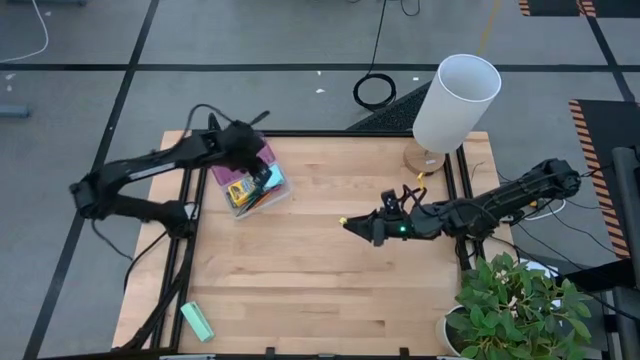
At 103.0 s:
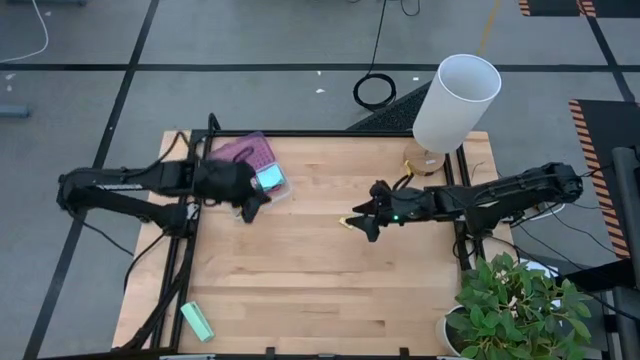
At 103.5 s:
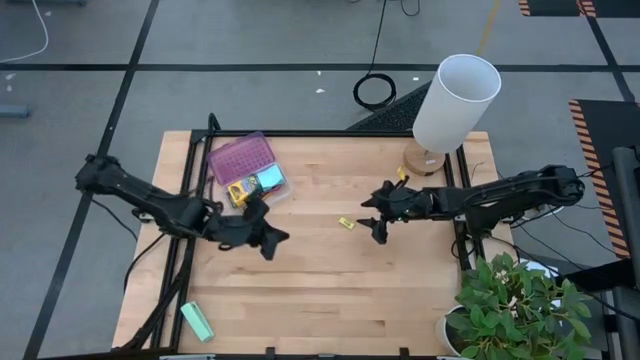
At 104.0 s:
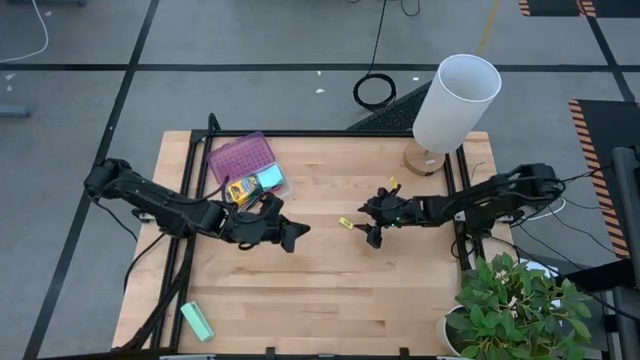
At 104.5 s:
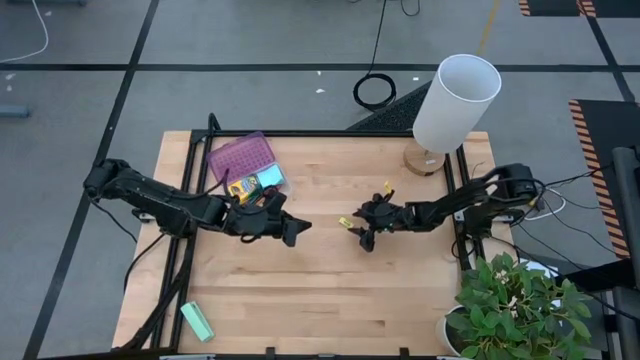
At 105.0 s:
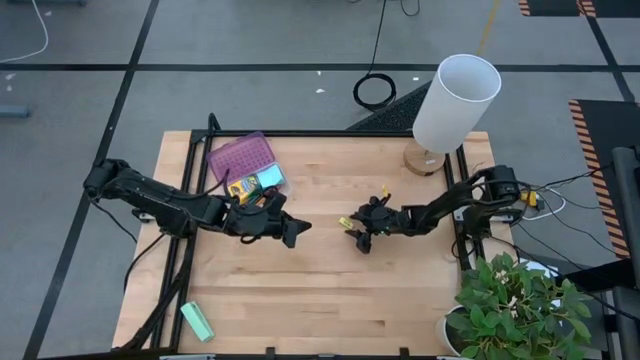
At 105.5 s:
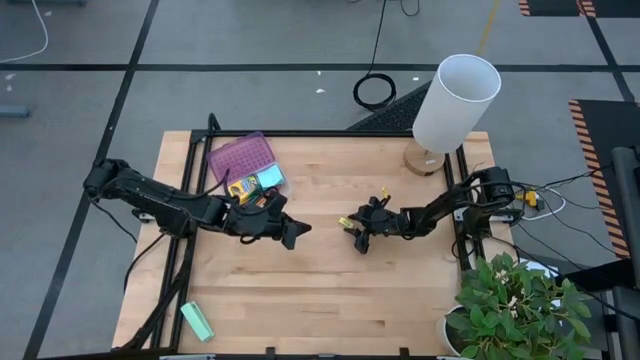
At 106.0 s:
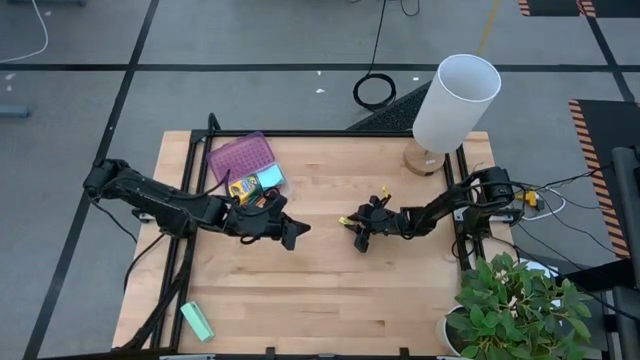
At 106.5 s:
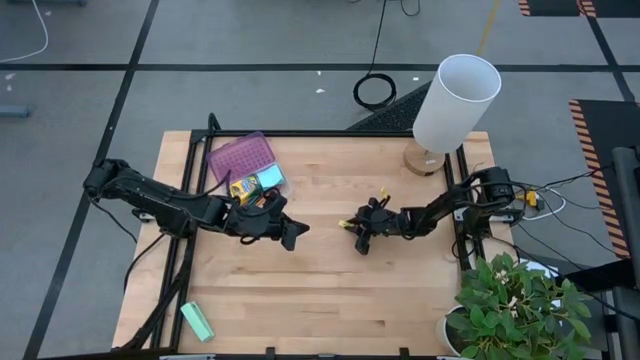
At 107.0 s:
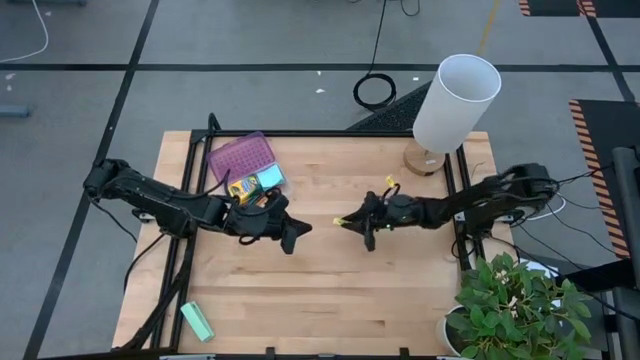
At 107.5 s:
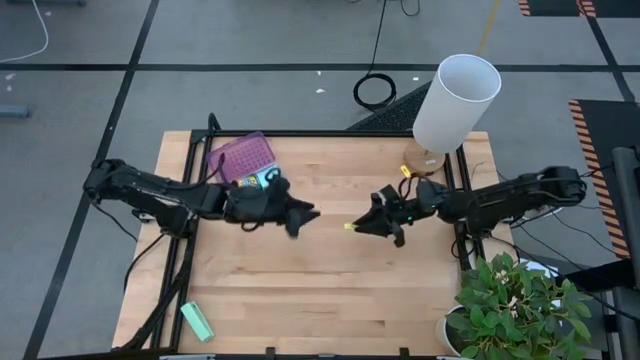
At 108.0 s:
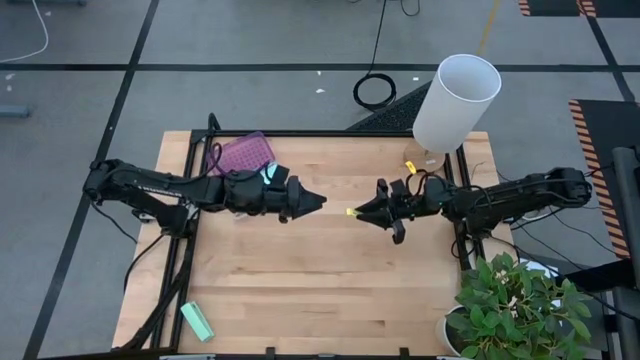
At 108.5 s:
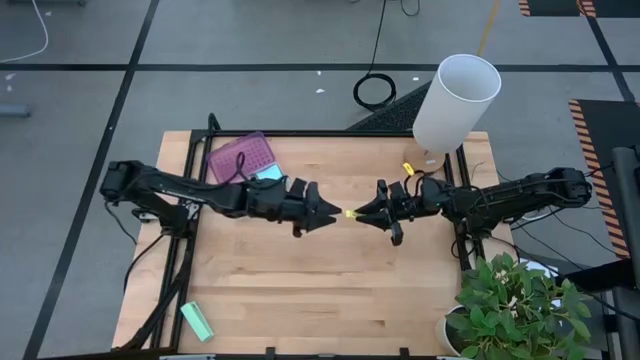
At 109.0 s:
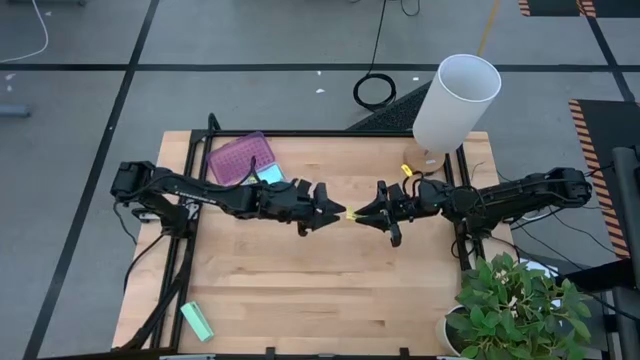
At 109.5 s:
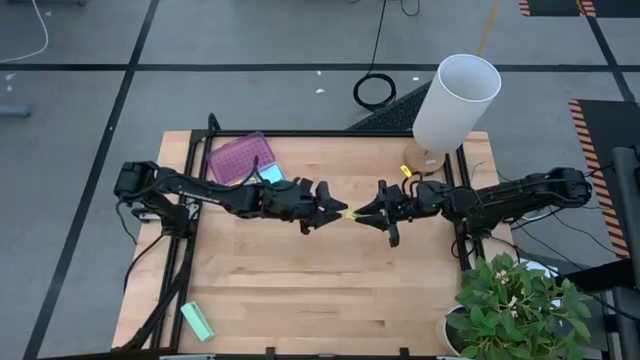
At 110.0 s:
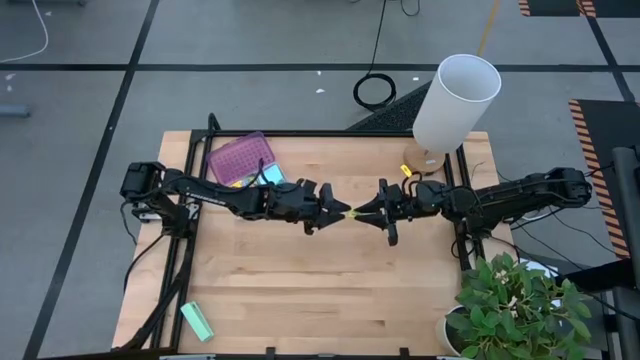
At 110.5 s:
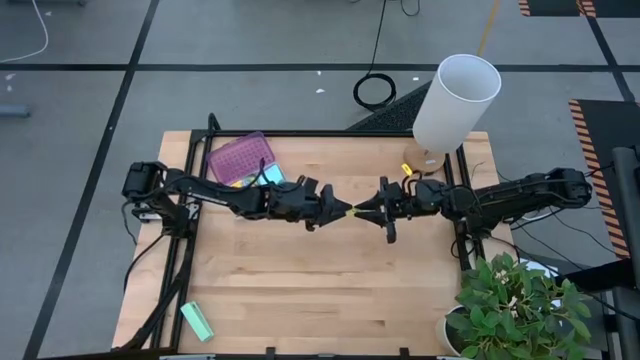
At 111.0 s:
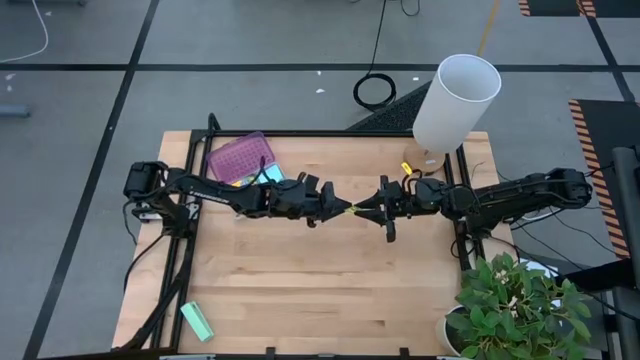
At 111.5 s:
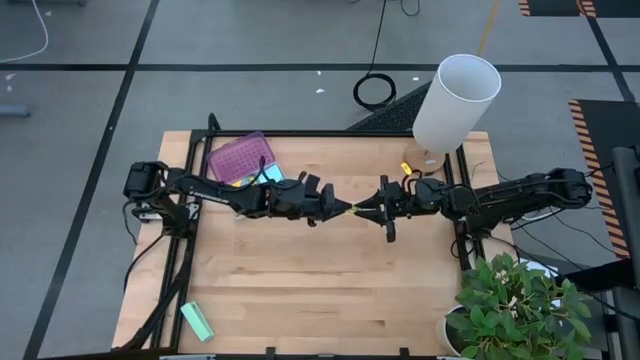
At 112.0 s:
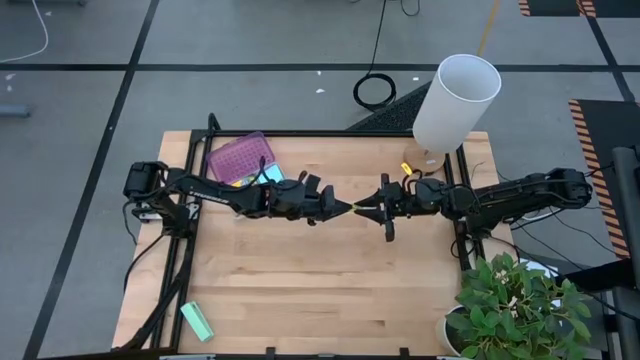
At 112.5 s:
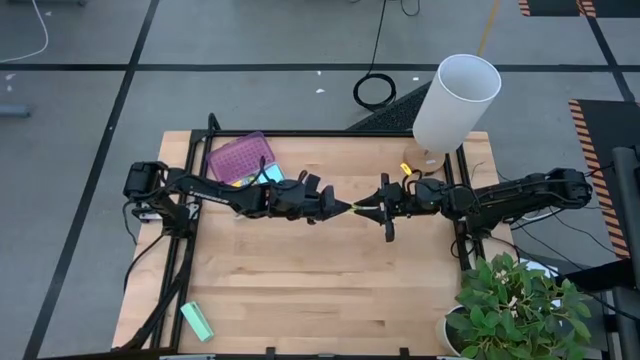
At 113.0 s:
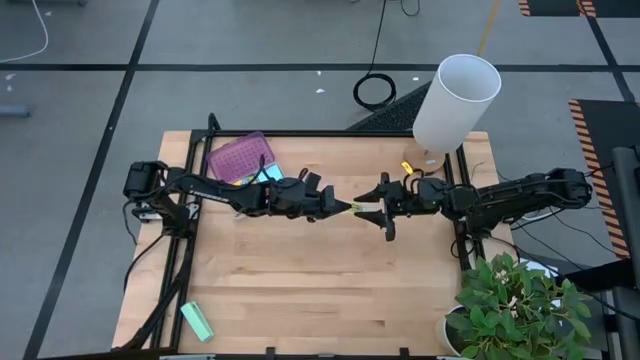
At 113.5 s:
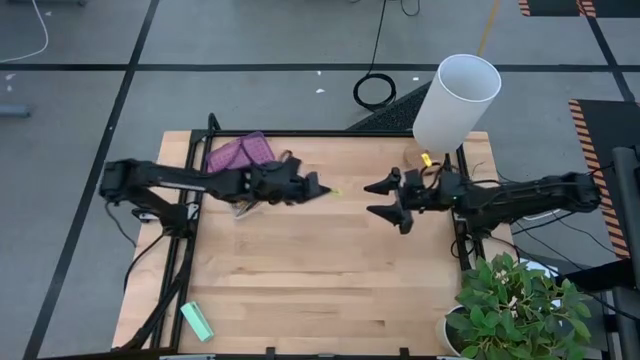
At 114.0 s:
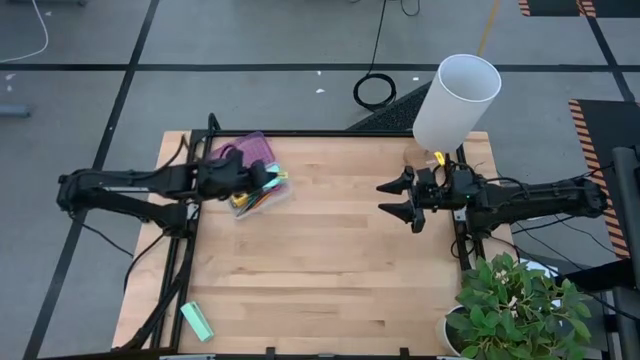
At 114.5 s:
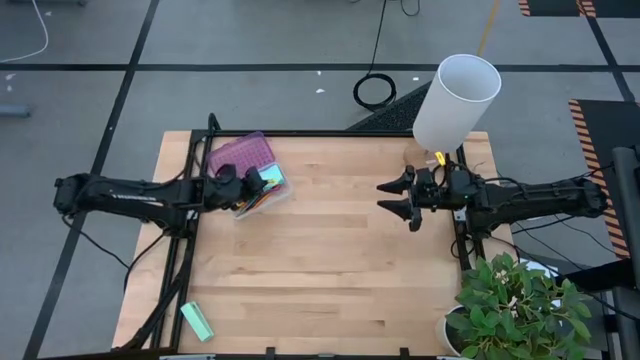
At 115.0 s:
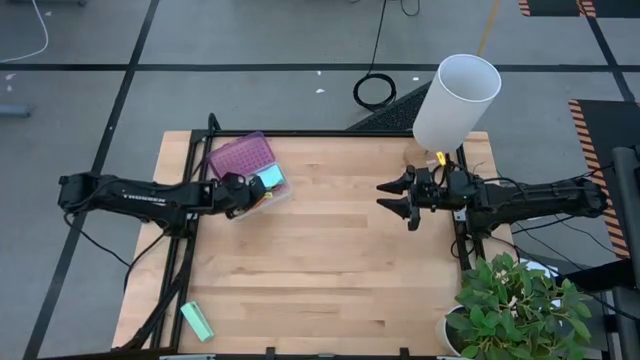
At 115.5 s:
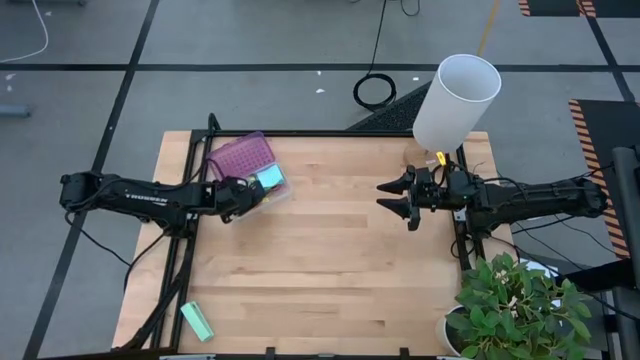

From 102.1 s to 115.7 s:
Task: Pack school essentials
Put the green eraser into the supply box

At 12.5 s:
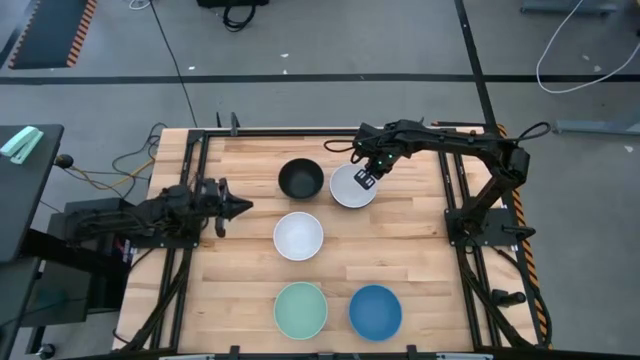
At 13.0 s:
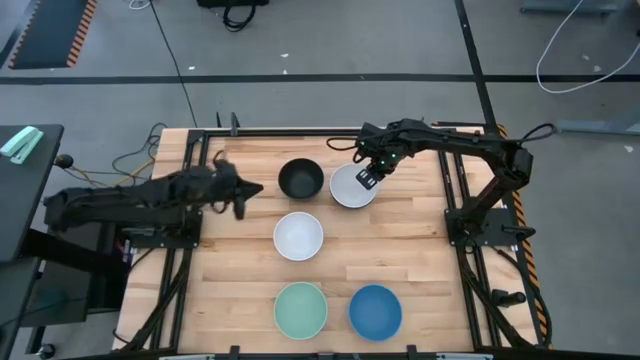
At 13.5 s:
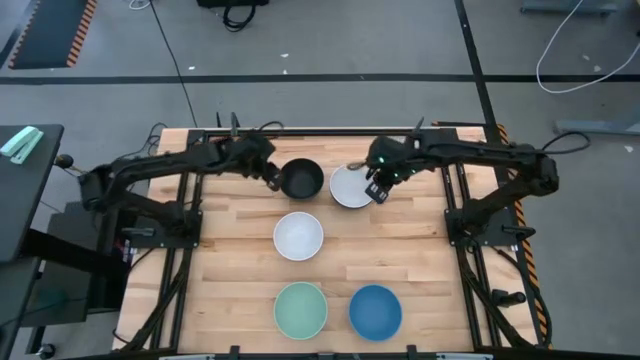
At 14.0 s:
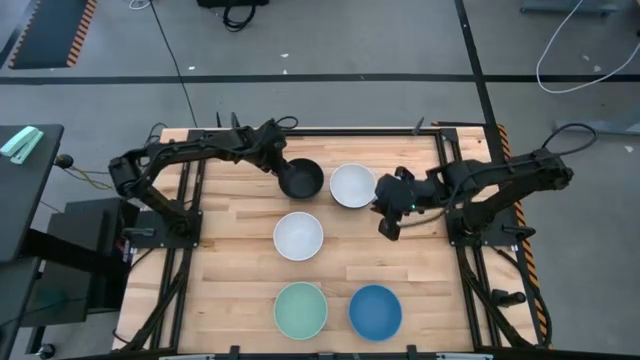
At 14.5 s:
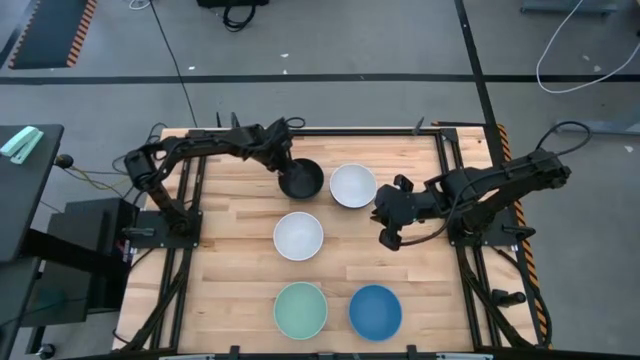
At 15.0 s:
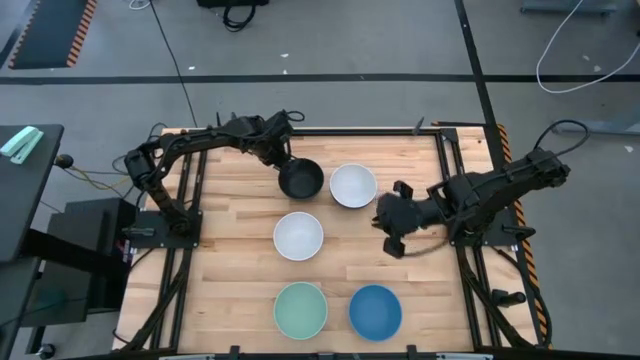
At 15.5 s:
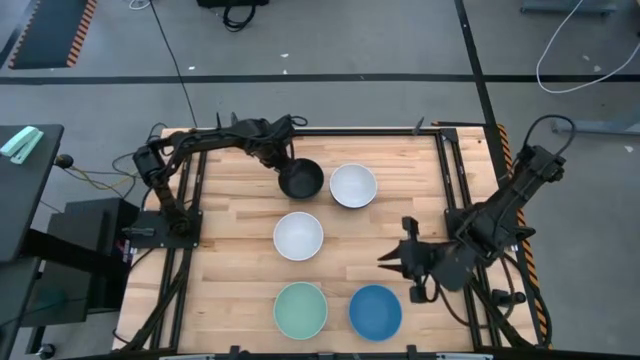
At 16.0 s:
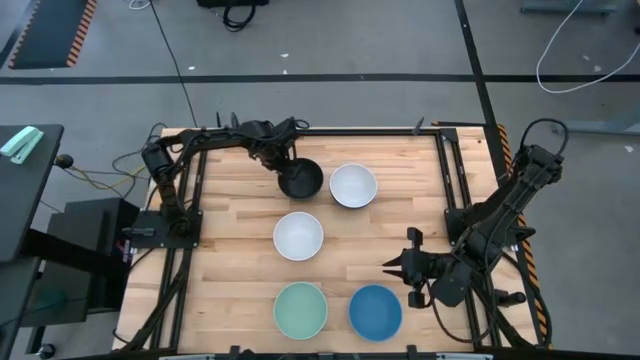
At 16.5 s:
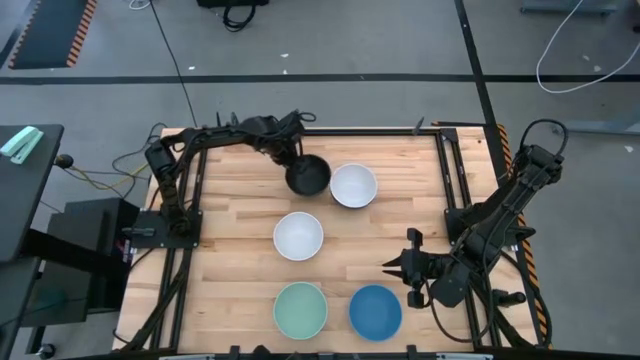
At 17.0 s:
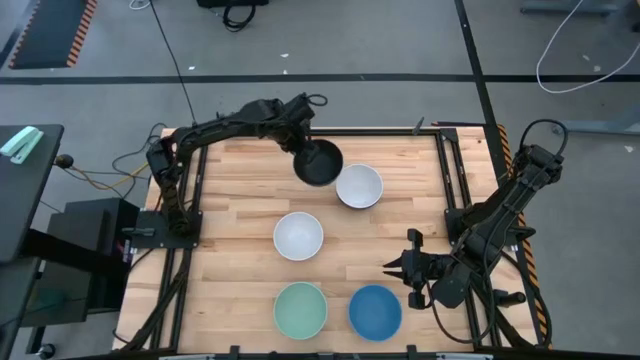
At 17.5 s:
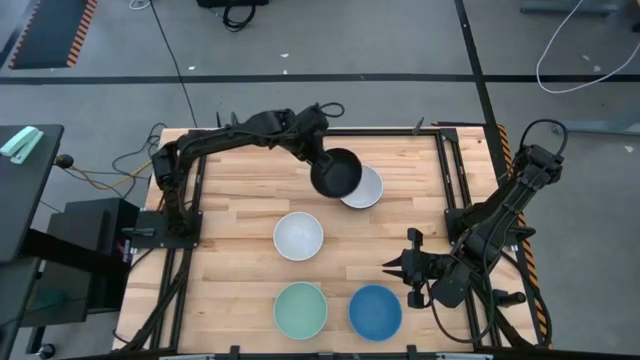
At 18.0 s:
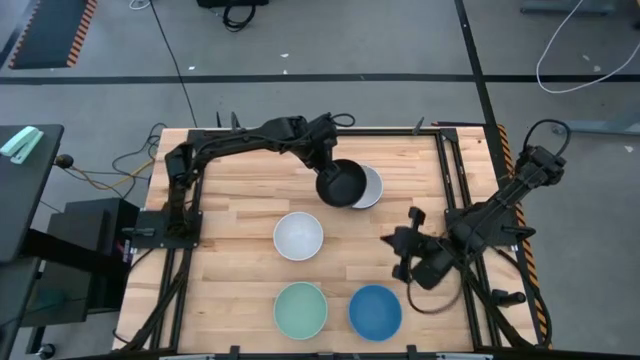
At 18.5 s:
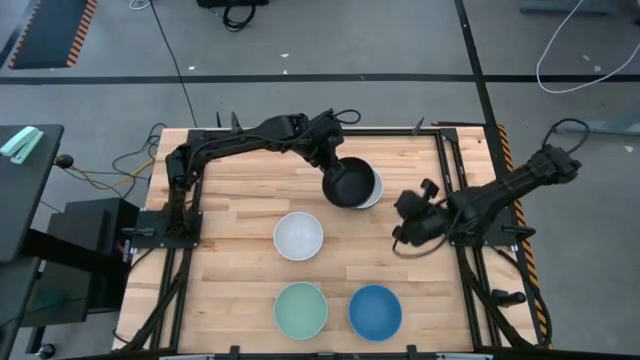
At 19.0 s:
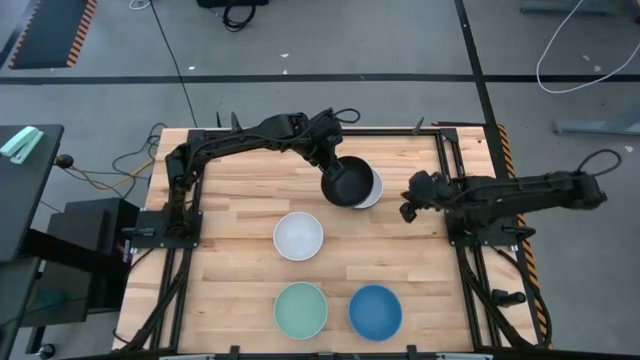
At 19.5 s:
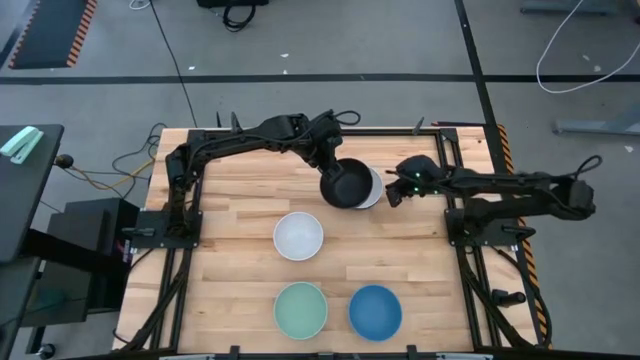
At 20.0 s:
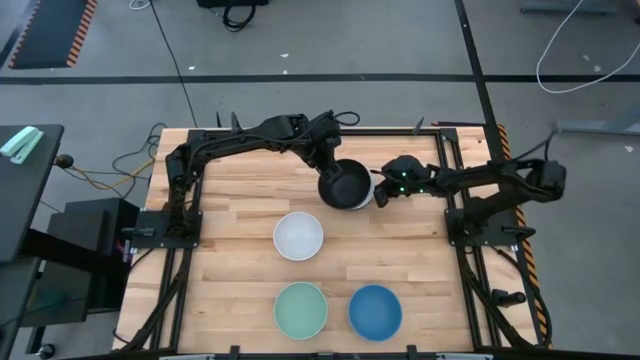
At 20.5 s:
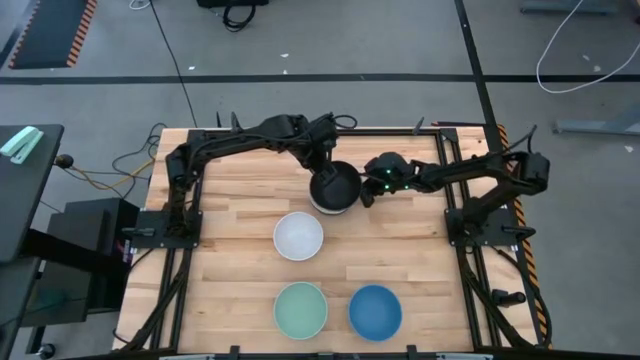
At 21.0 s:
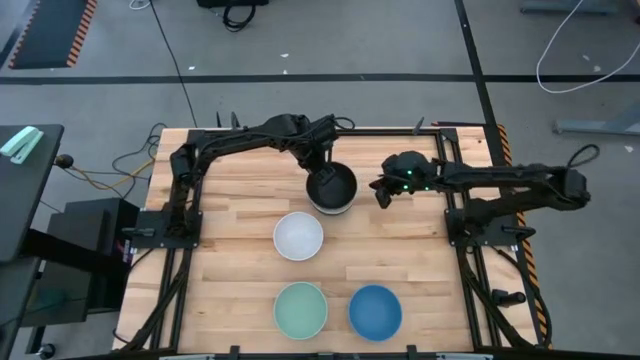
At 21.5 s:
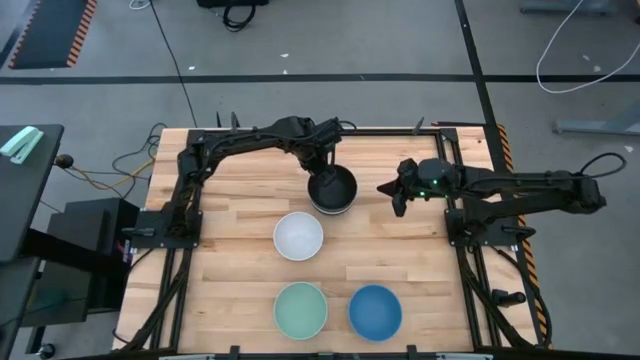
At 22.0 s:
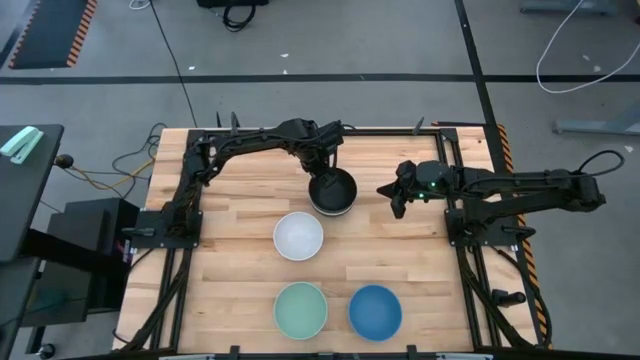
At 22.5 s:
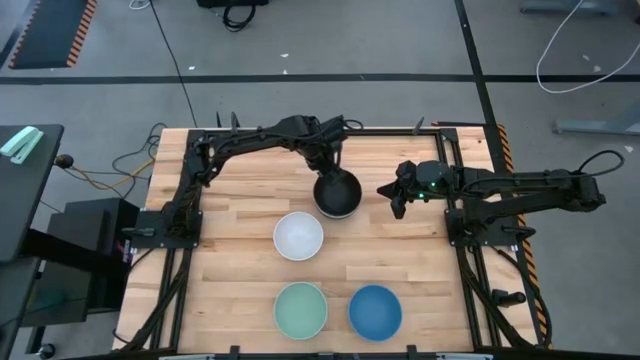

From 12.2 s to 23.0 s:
Task: Nest bowls inside each other
Stack the black bowl on the top white bowl
